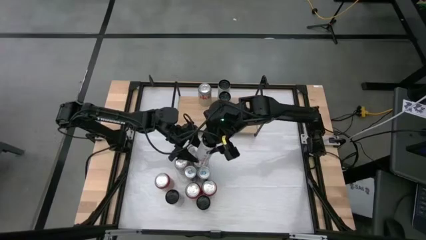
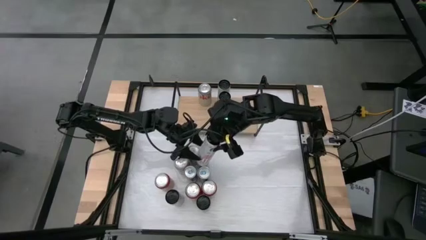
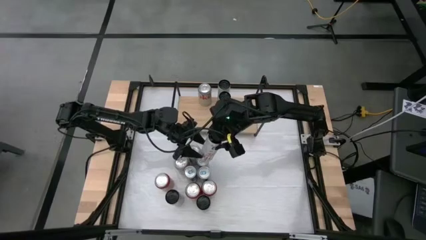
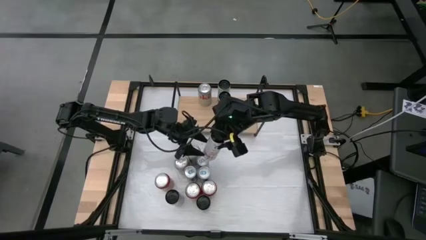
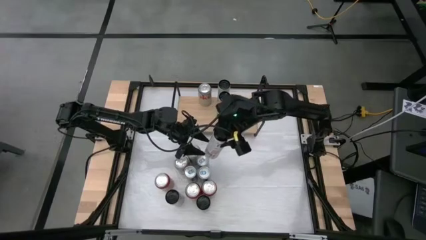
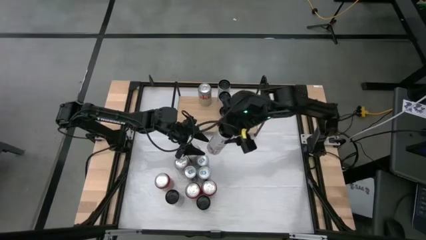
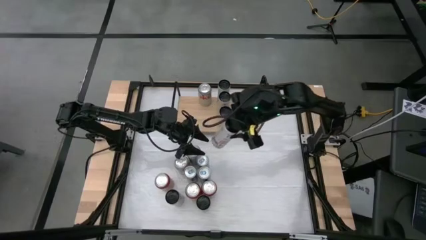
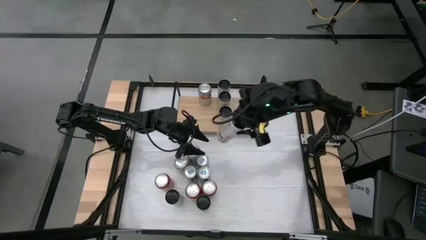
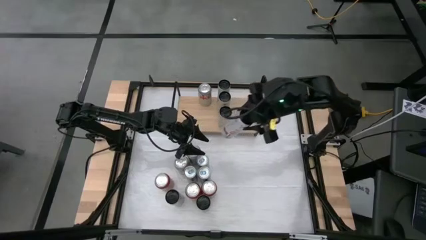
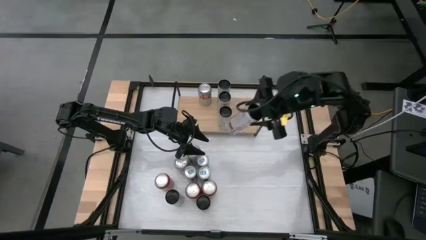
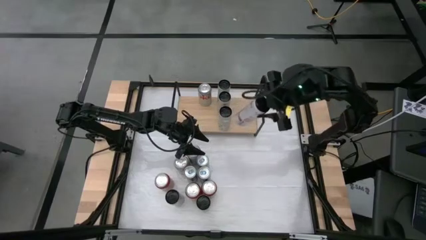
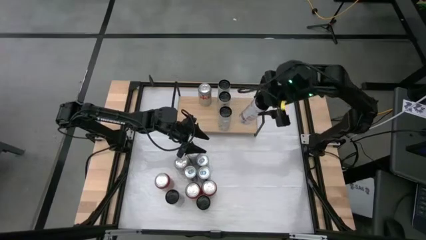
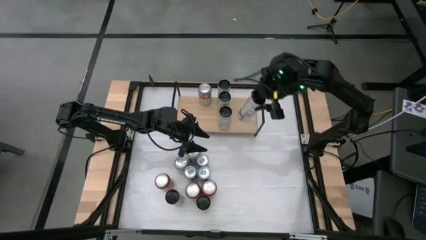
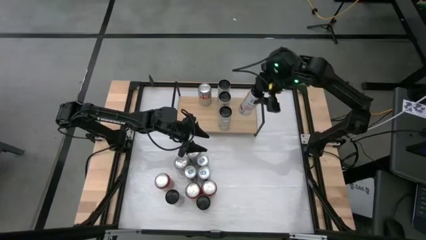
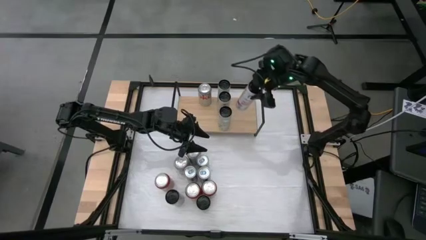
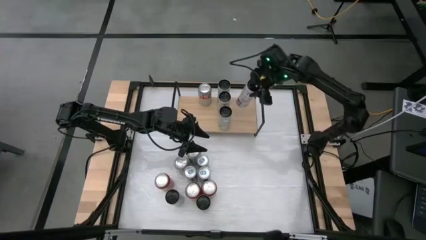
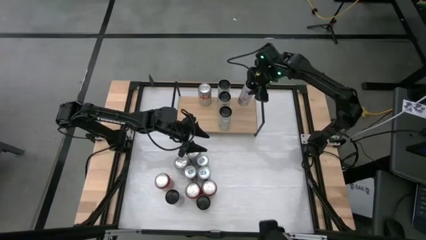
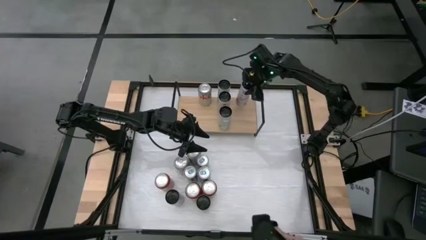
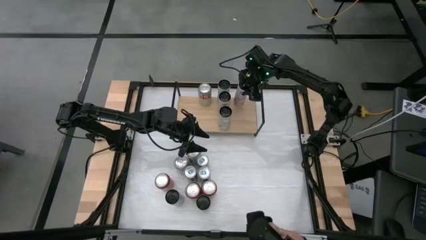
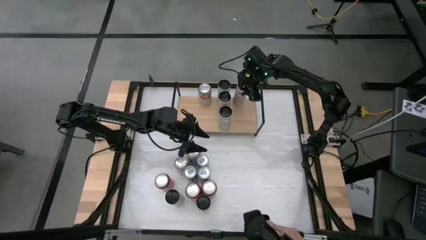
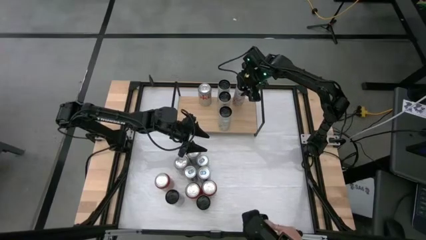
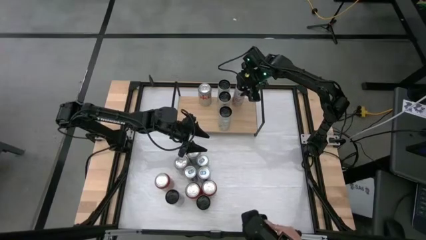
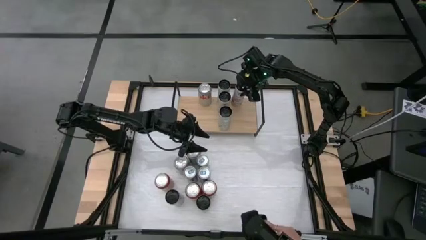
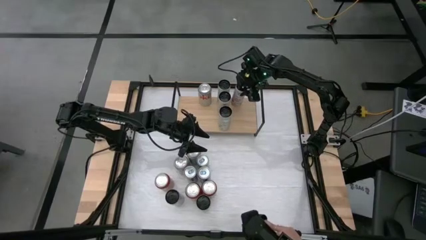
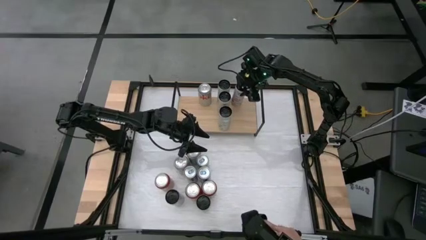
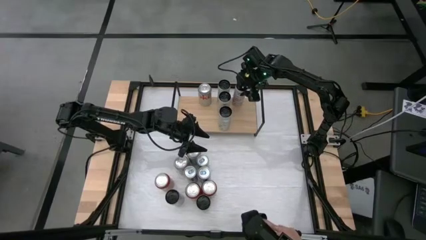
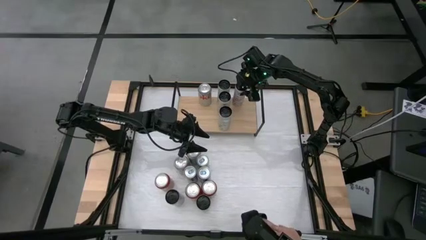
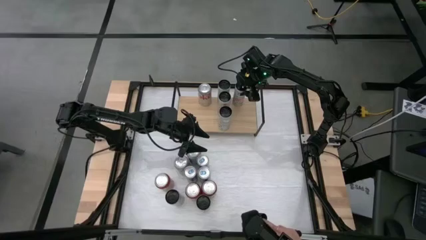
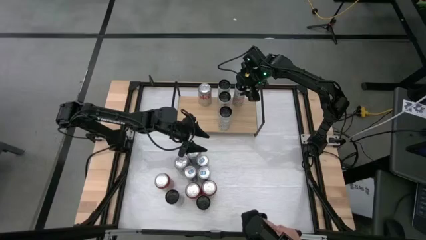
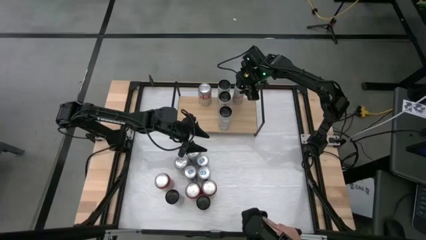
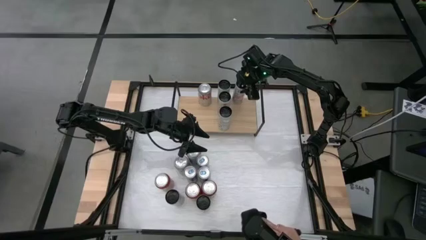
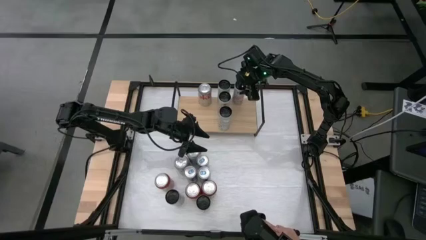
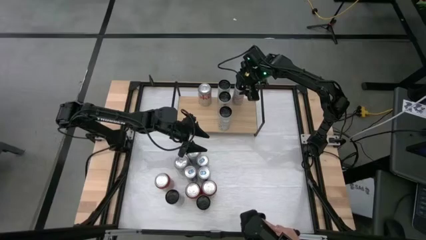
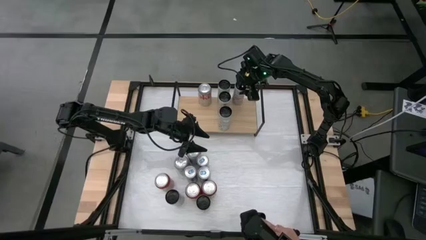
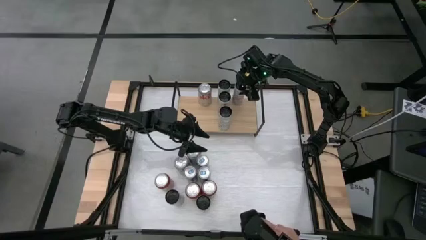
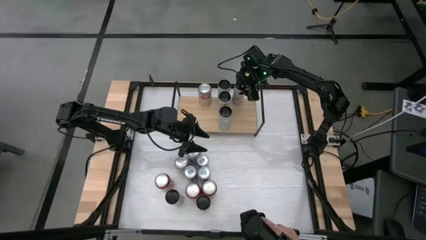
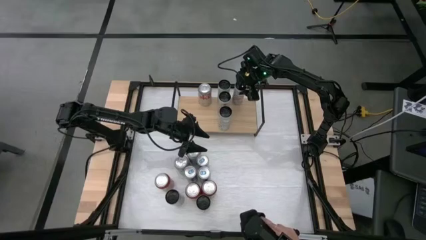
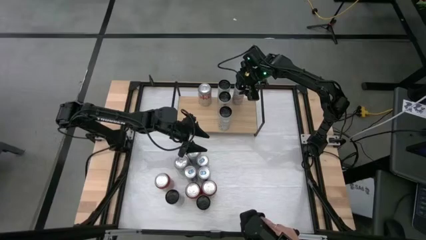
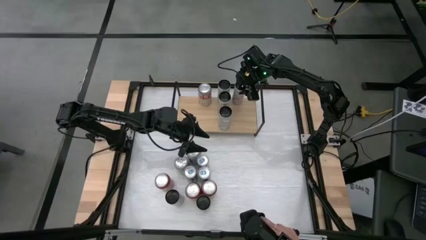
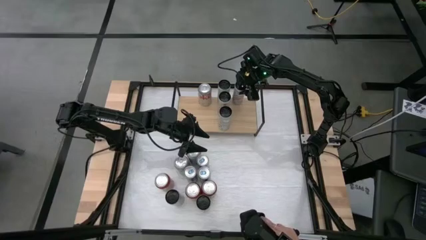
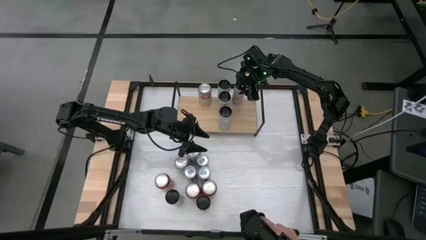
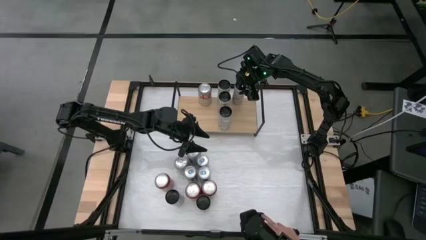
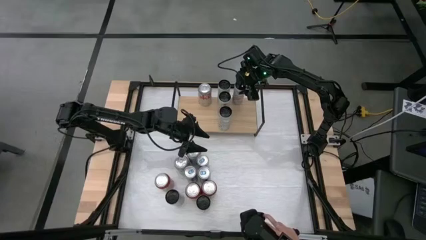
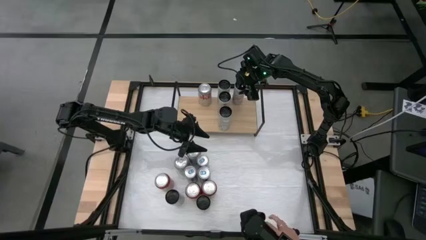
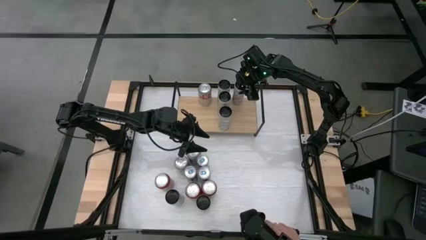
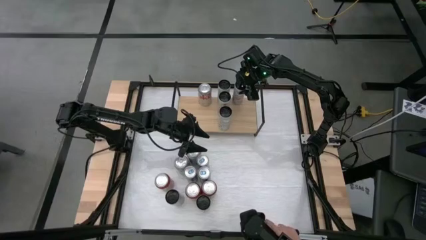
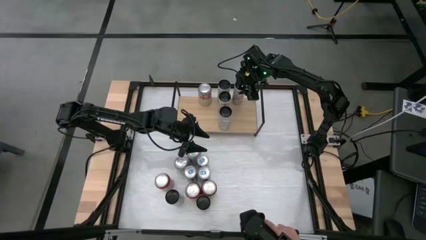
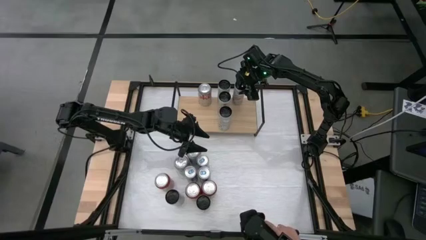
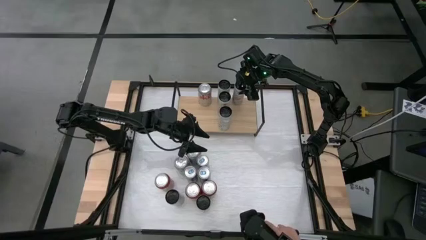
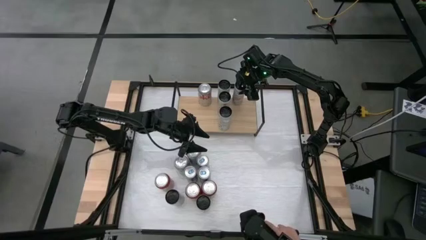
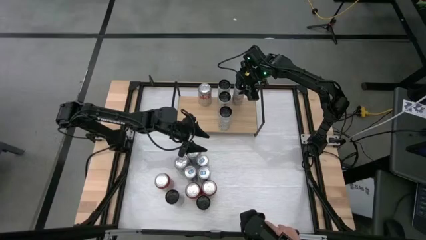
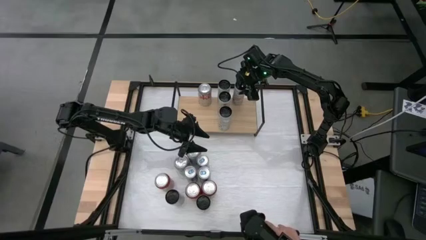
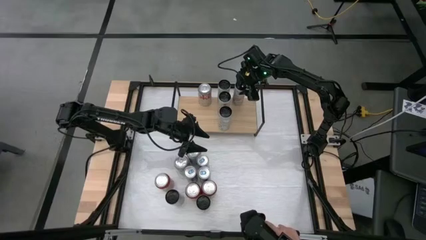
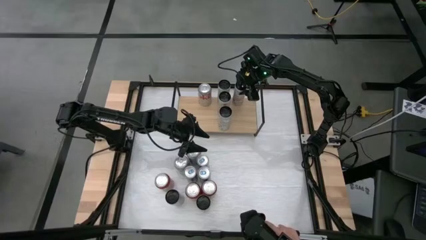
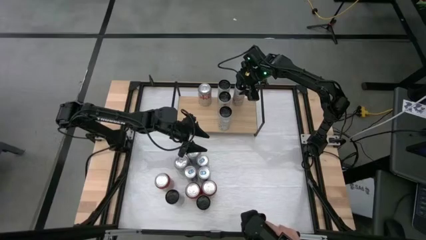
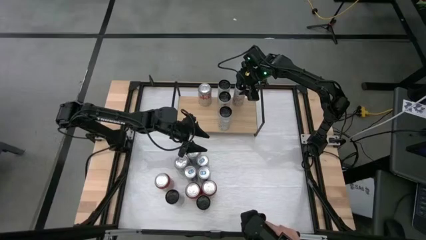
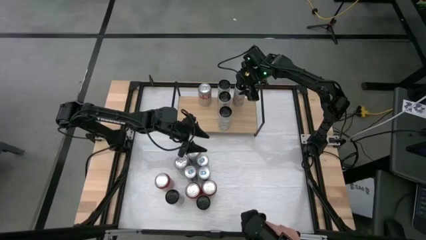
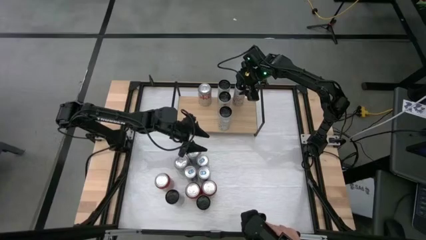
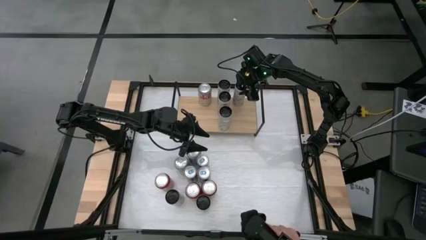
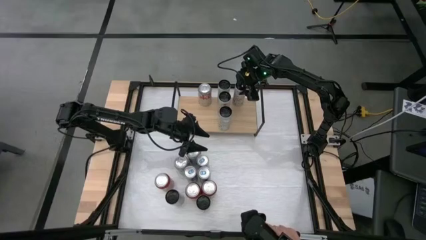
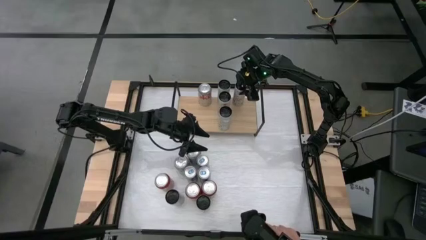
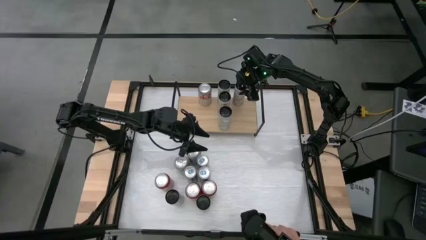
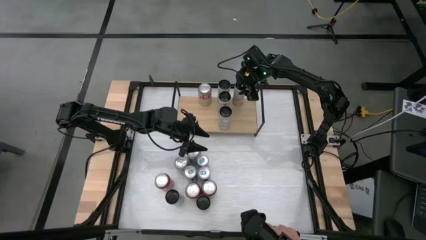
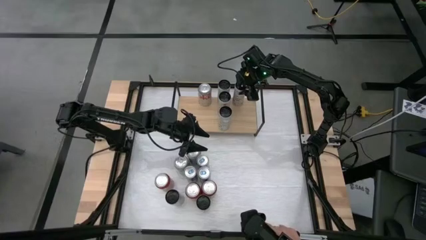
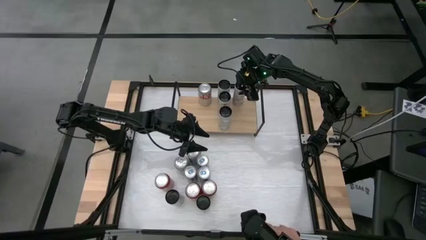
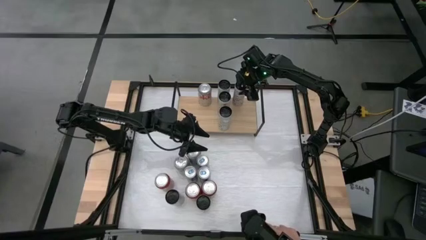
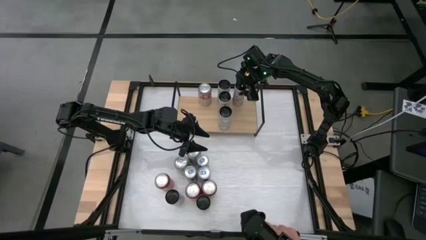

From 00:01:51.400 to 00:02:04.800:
Task: Place canned beverage on shelf
Put the white pink soda can onto the shelf

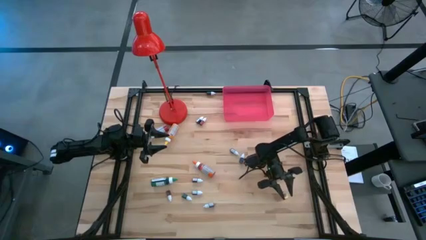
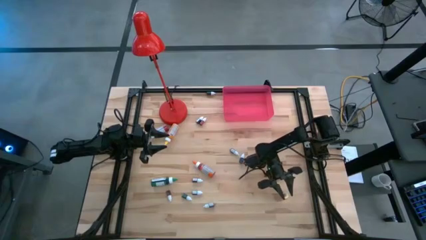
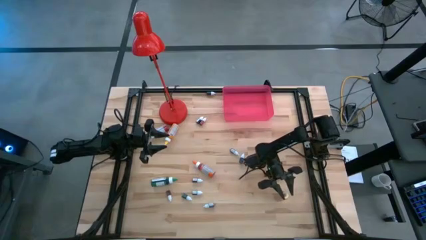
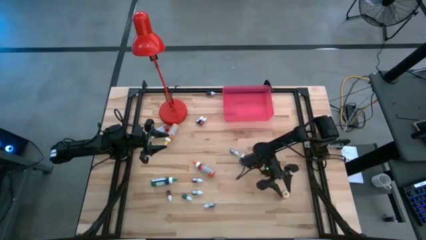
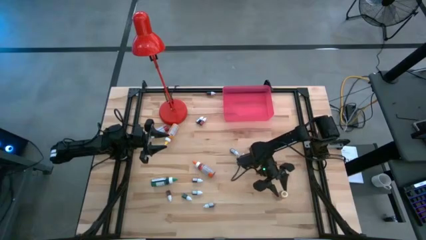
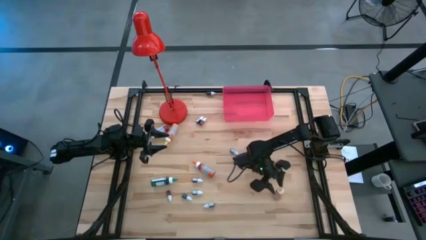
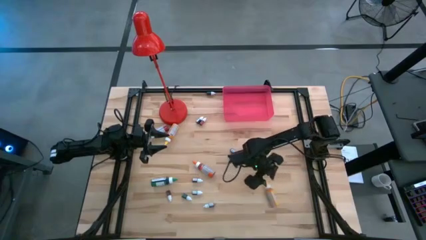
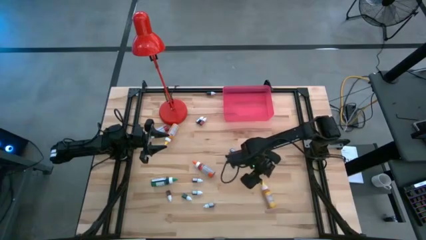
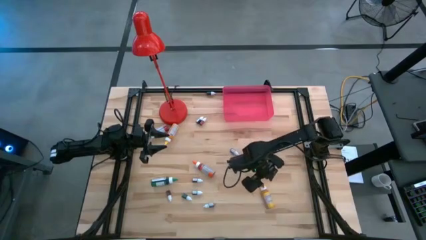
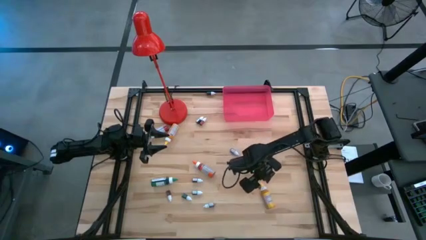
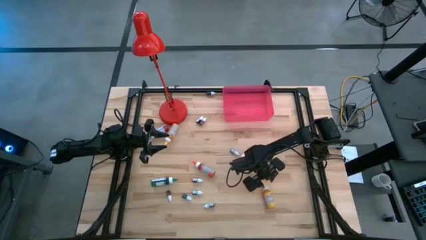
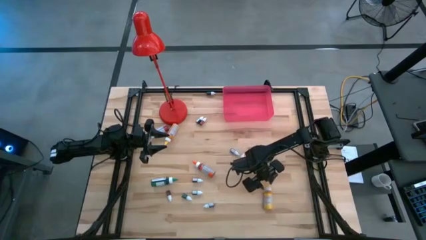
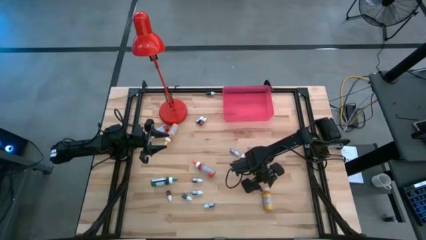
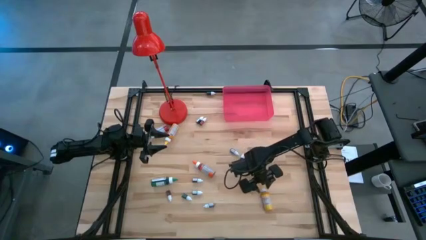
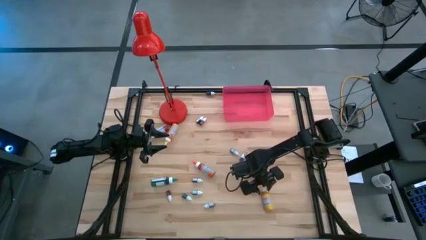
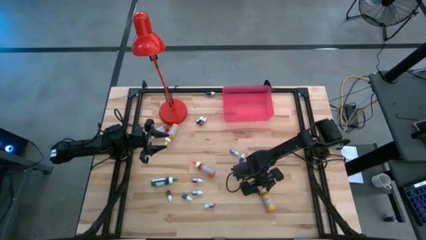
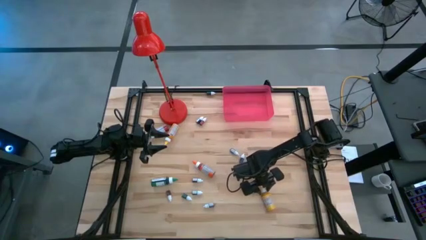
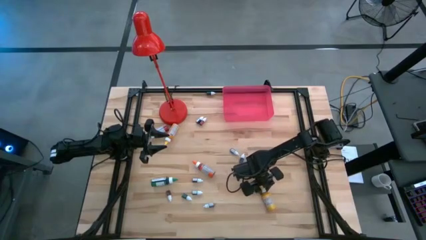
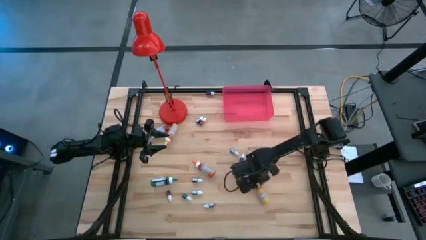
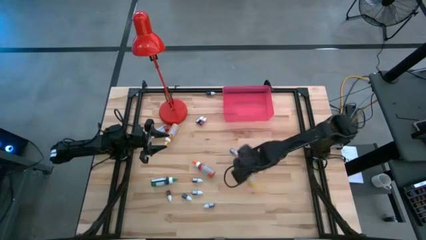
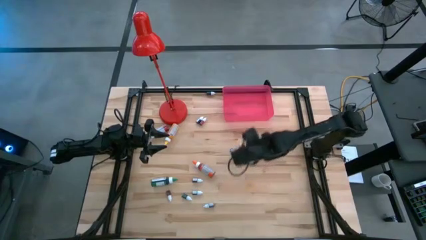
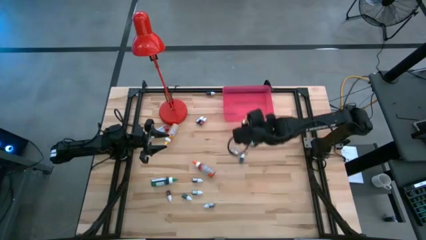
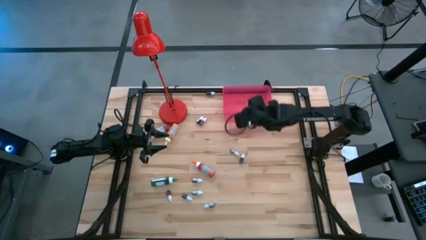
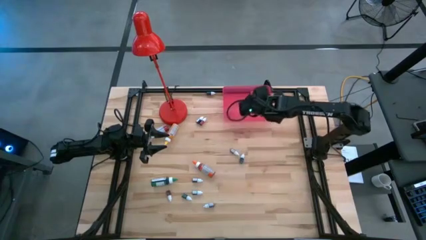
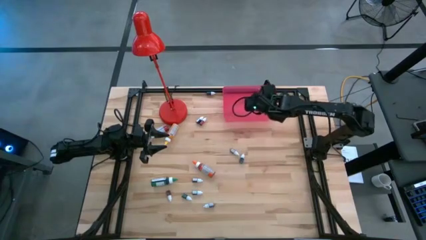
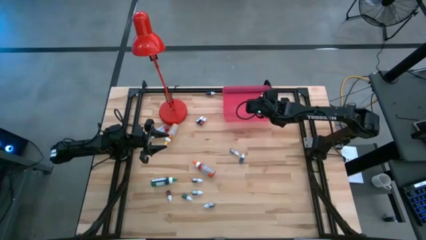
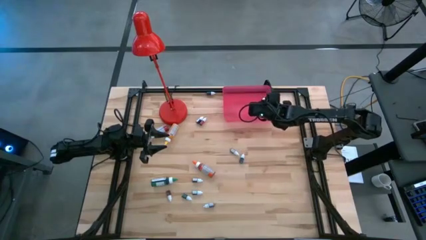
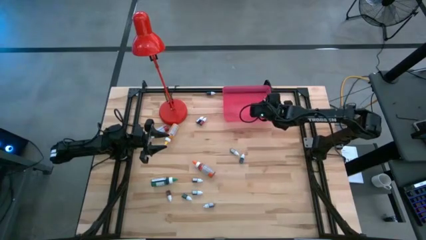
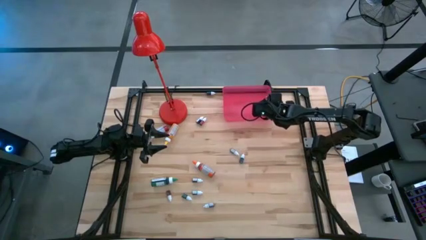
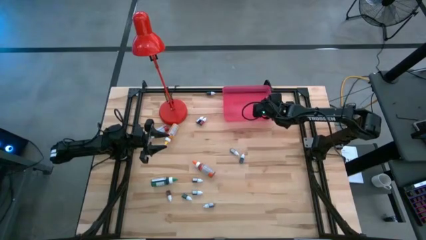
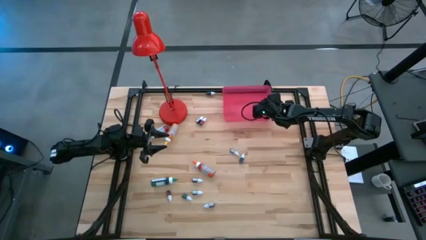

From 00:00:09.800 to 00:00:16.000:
Task: Pick & Place food coloring
Put the large yellow food coloring bottle into the red bin
